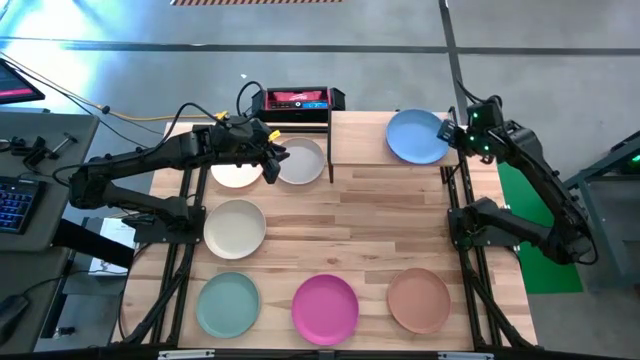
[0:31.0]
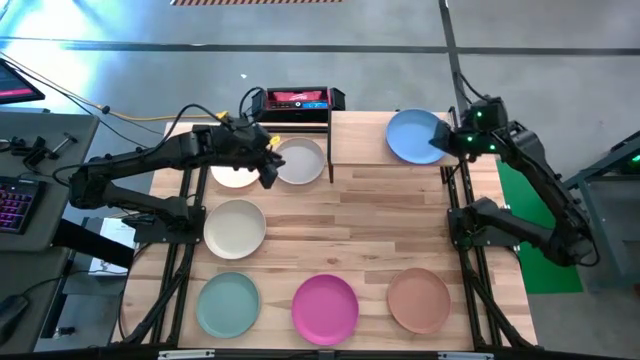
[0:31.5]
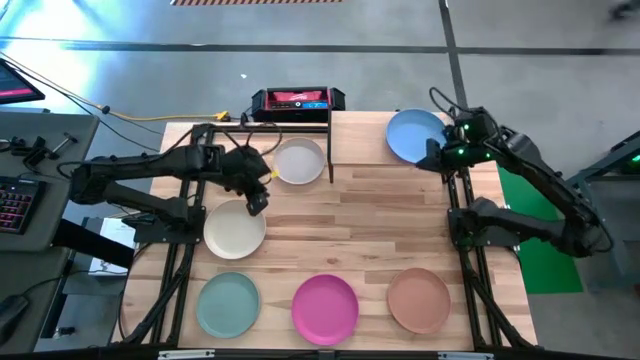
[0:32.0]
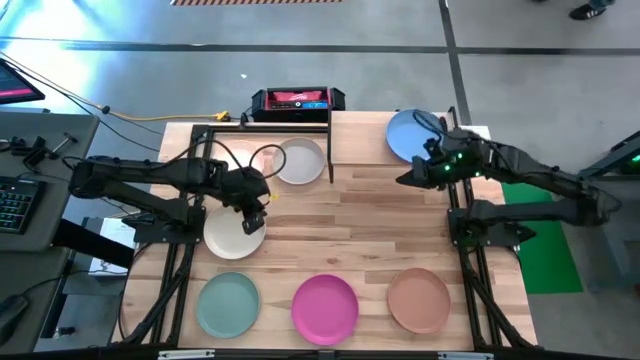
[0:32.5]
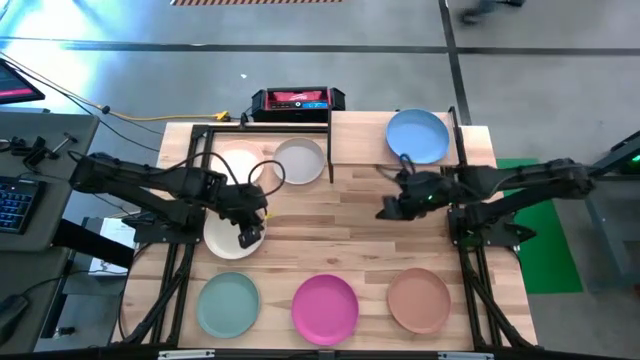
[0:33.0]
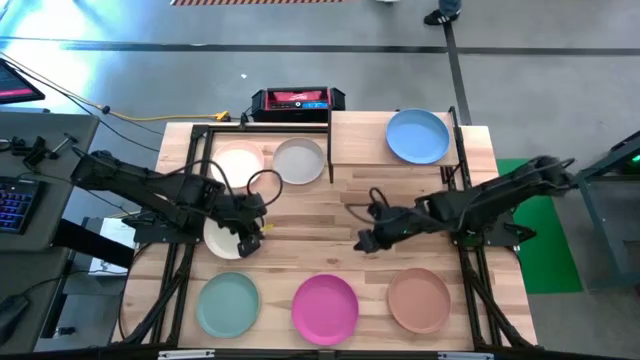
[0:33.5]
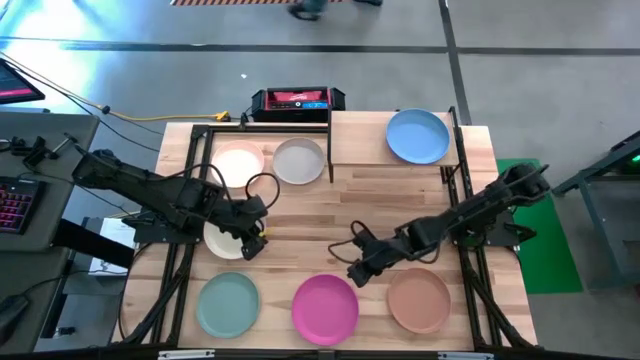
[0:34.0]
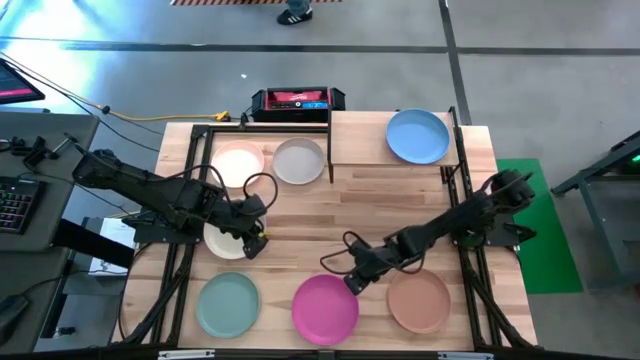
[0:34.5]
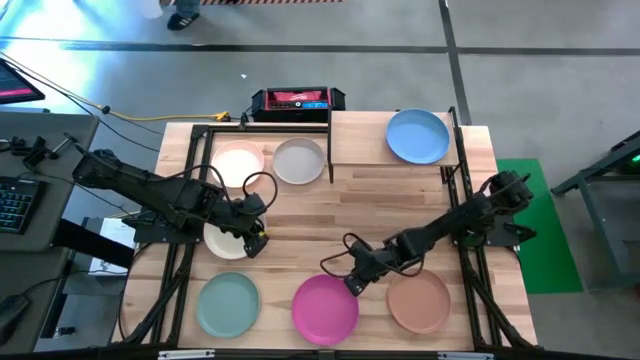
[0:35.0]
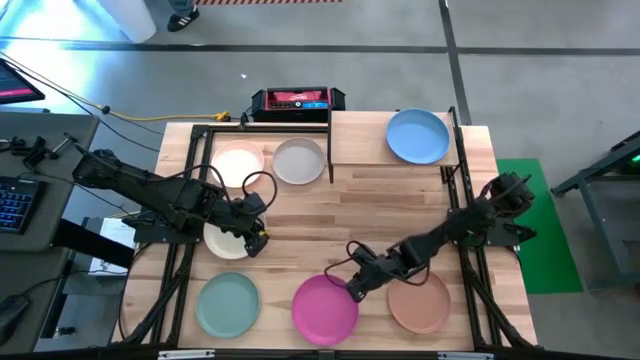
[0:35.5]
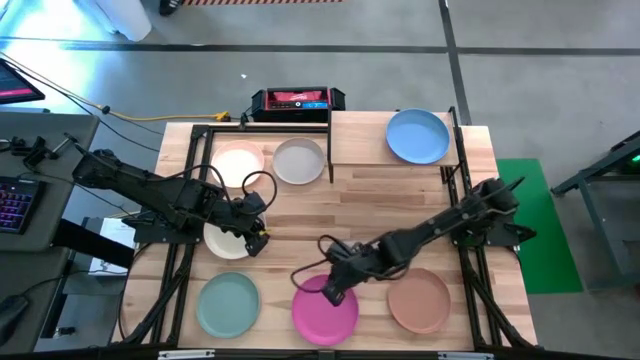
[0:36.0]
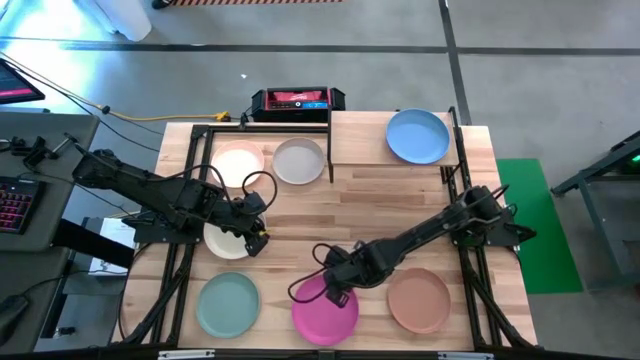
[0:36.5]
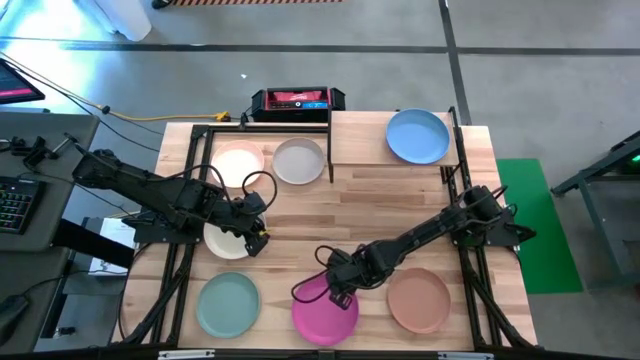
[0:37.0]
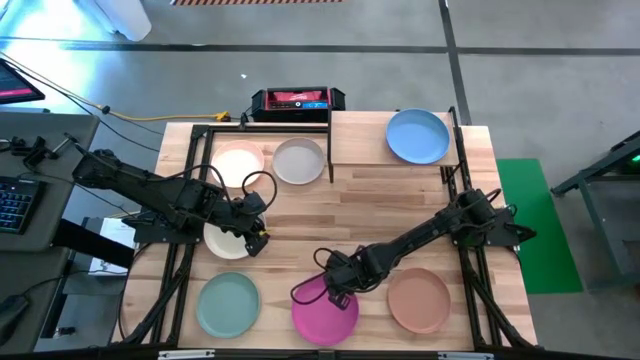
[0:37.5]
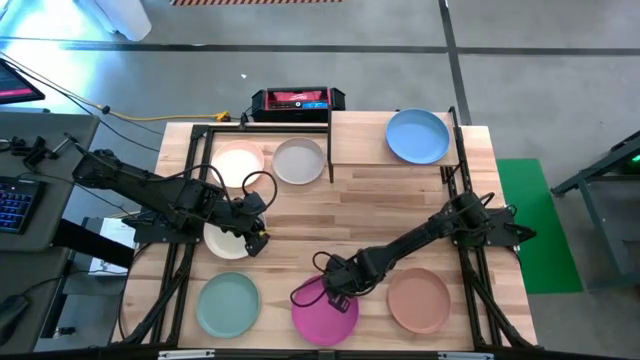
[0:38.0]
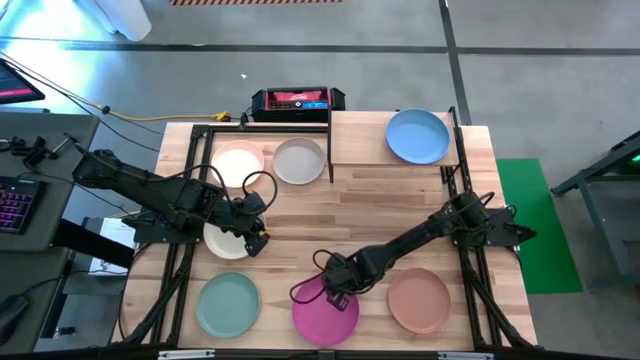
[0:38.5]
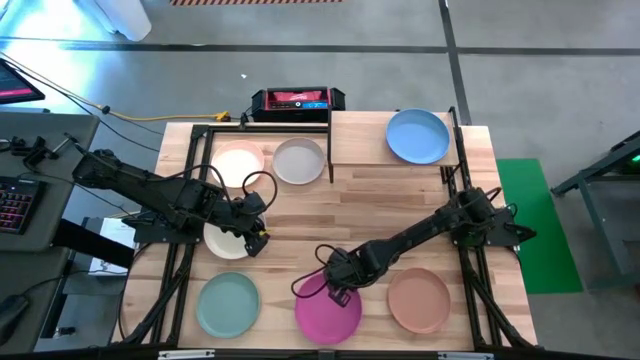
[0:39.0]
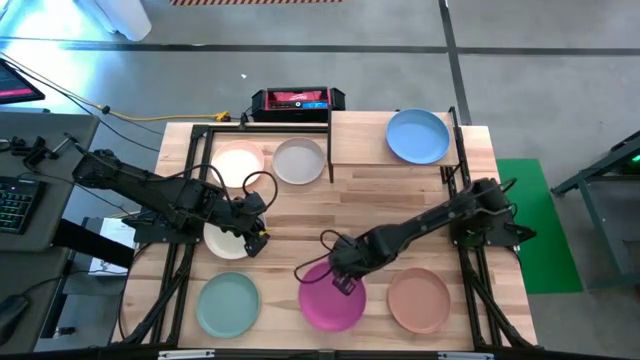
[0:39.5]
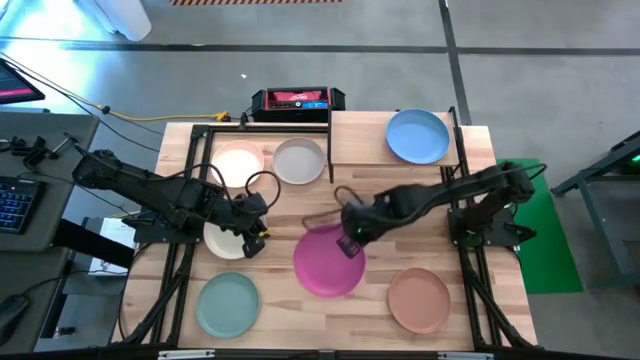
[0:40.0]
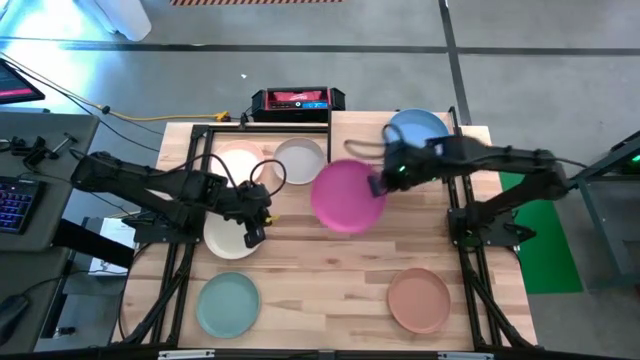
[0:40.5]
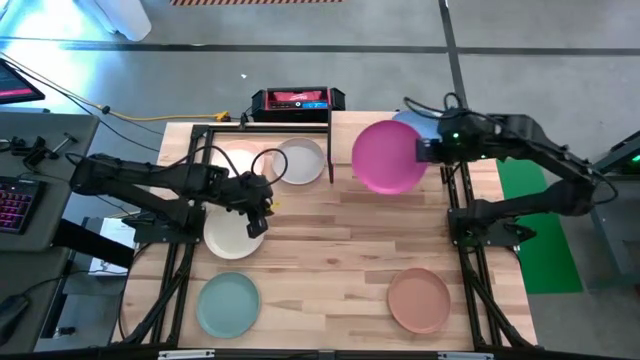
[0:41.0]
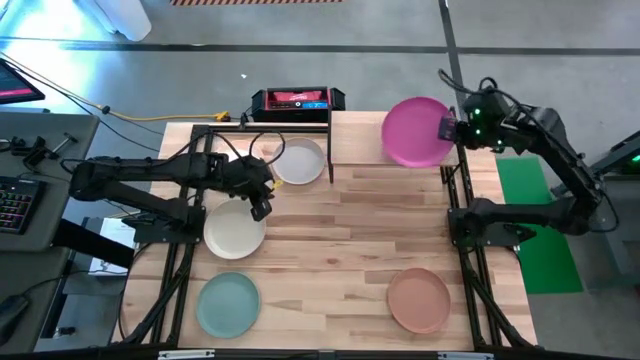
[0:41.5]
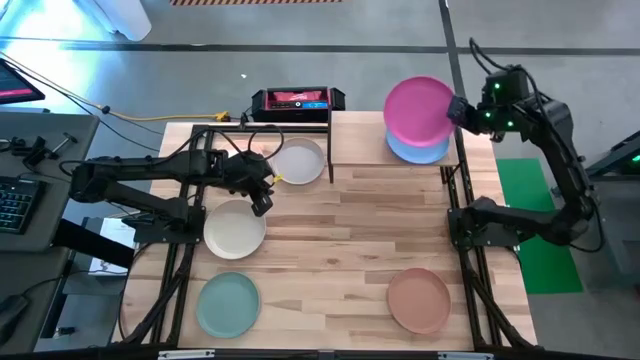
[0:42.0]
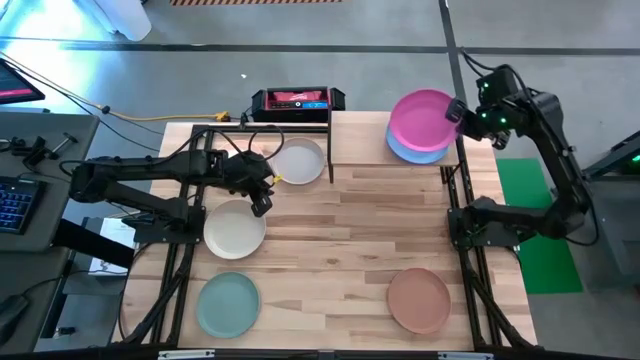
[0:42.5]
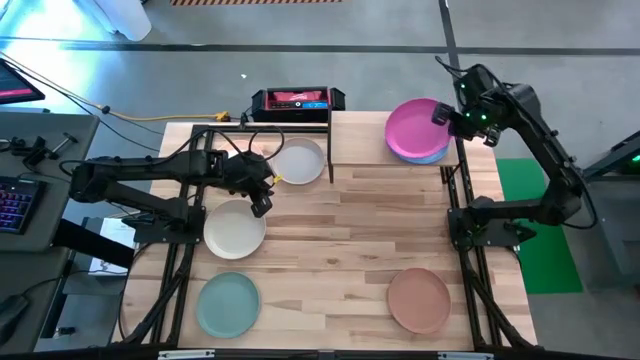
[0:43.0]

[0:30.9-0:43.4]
Task: Place and stack plates onto a shelf
Stack the pink plate on top of the blue plate on the shelf

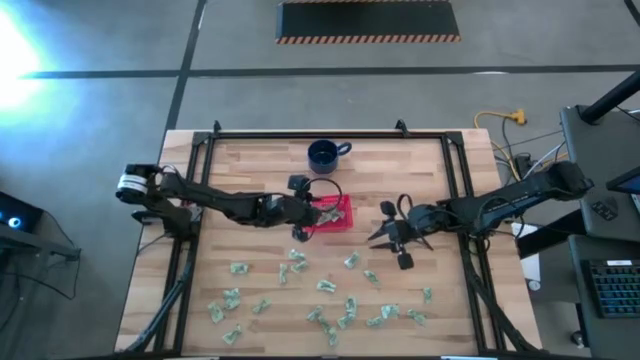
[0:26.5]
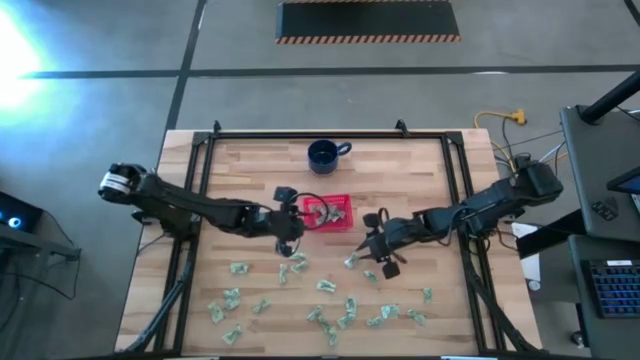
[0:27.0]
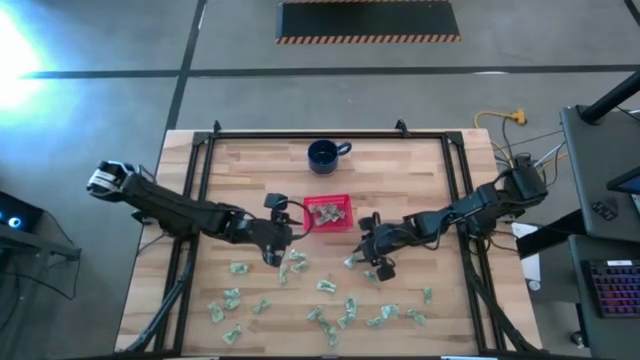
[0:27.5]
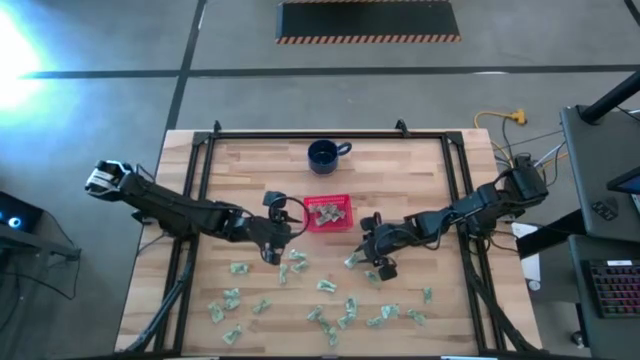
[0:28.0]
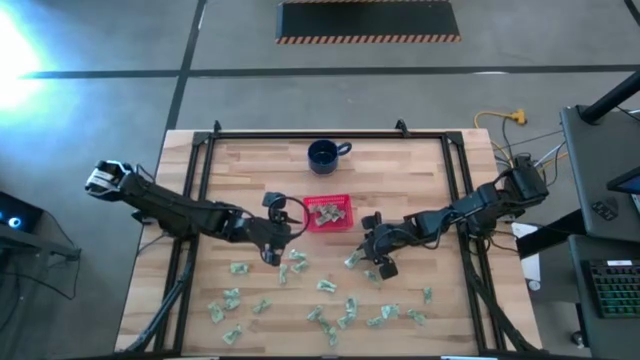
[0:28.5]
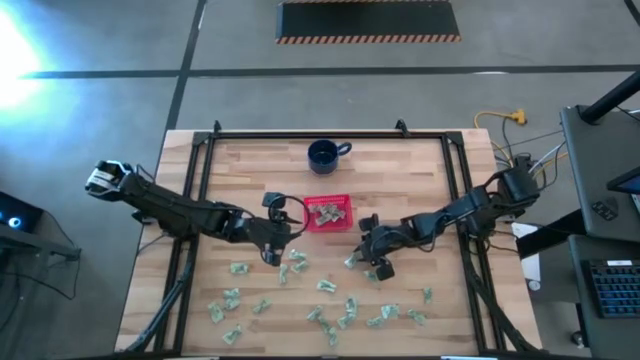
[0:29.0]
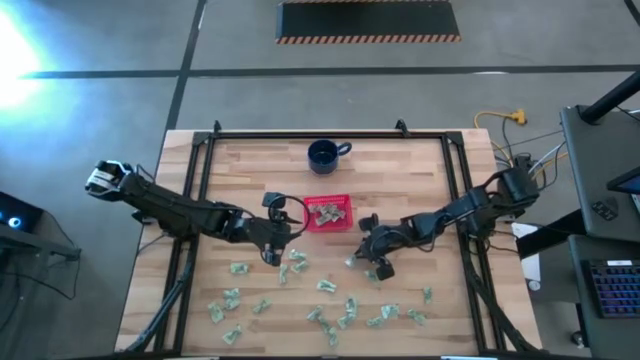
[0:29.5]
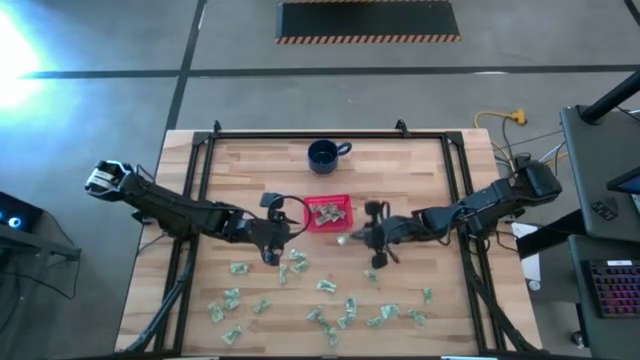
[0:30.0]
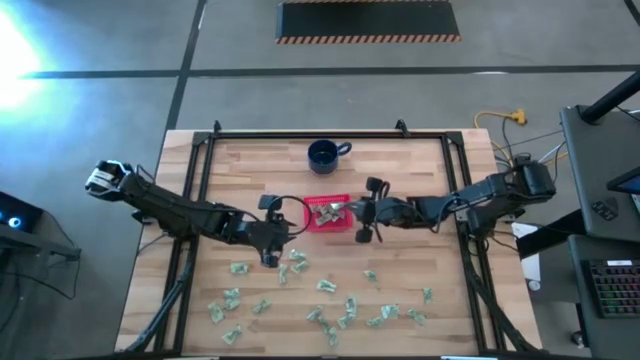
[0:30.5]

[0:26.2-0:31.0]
Task: Pick and place items into bin
Put the stevia packet into the red bin

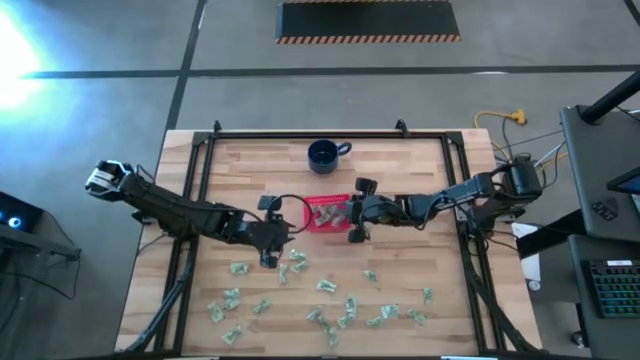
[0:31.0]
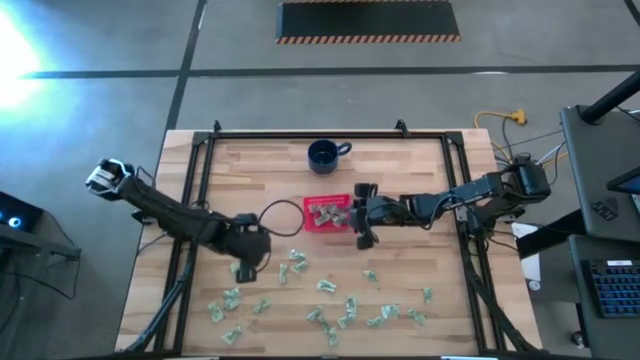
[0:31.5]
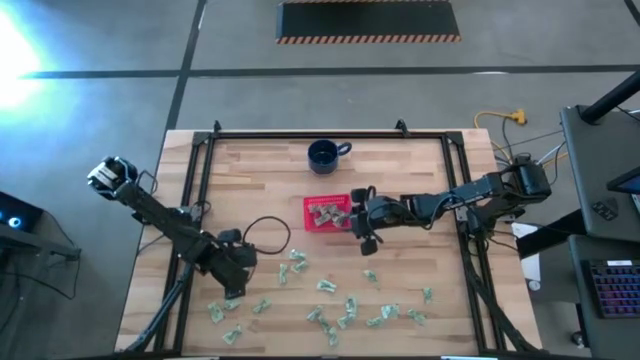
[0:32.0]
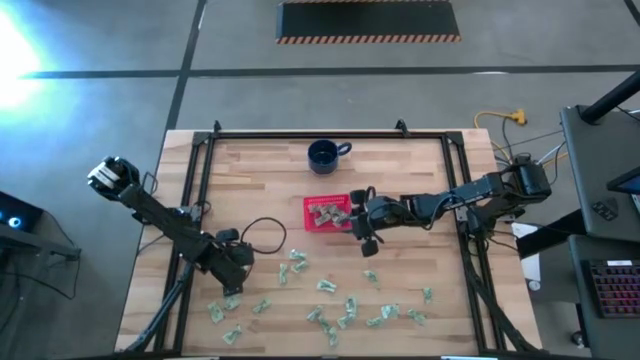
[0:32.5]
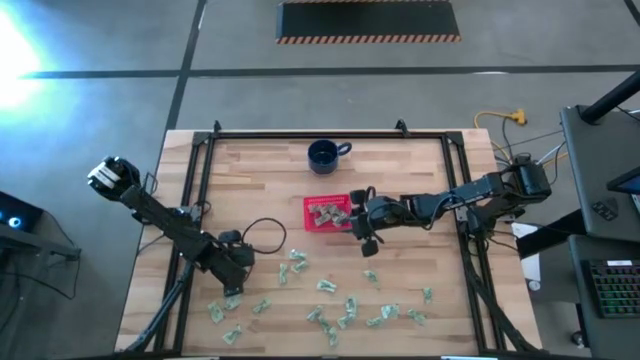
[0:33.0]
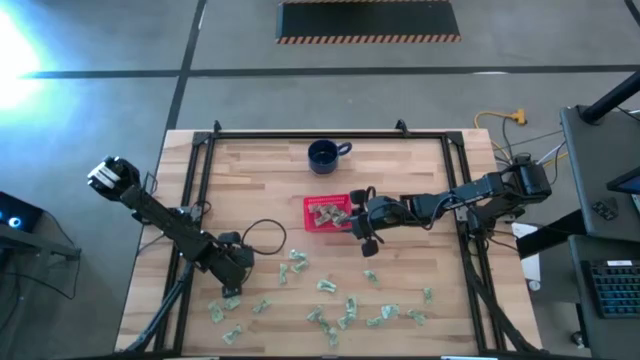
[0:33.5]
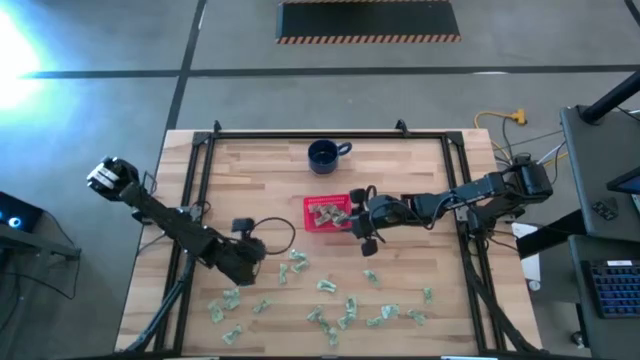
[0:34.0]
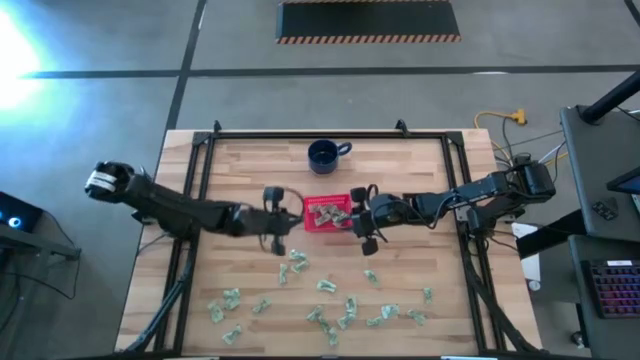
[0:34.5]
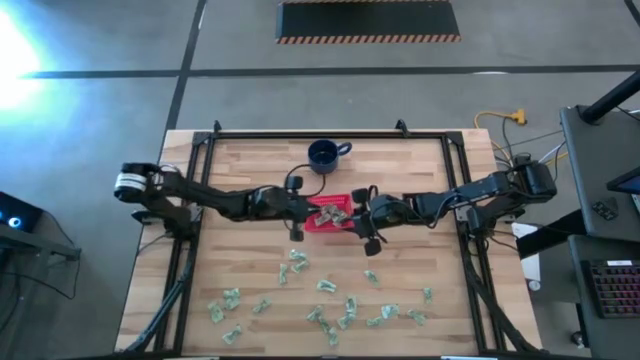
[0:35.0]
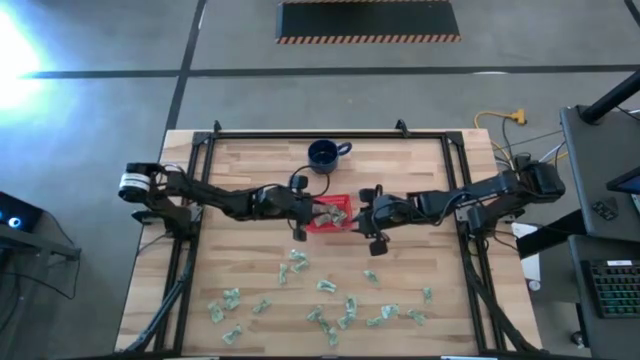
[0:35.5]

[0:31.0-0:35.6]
Put the stevia packet into the red bin
